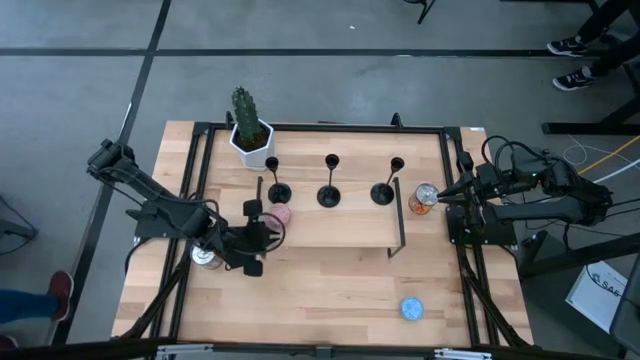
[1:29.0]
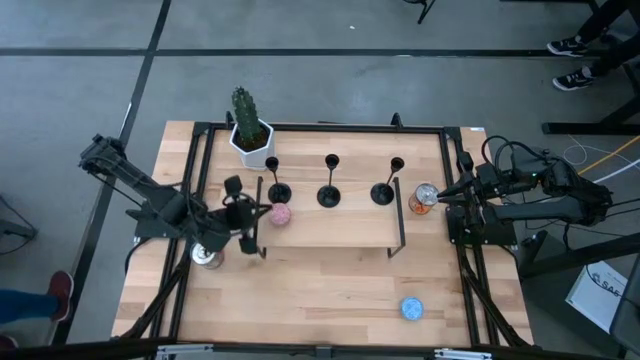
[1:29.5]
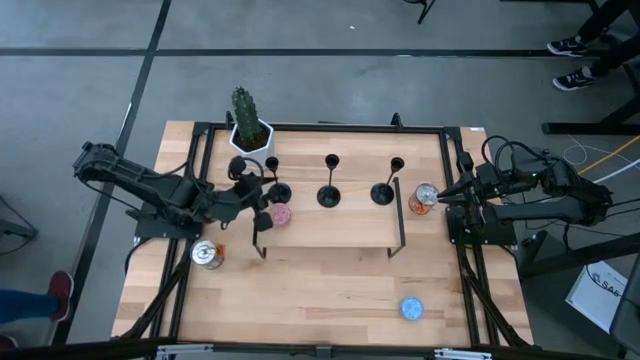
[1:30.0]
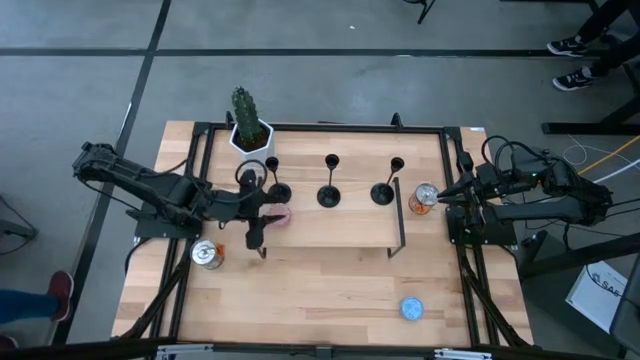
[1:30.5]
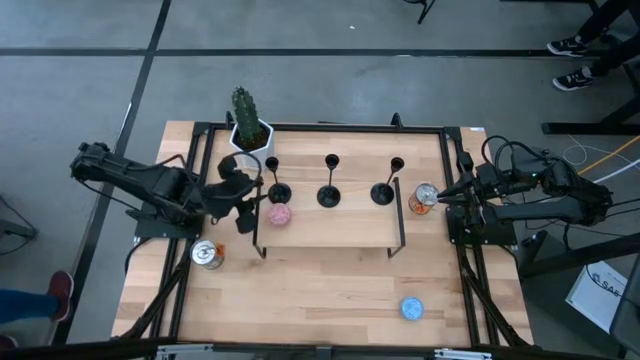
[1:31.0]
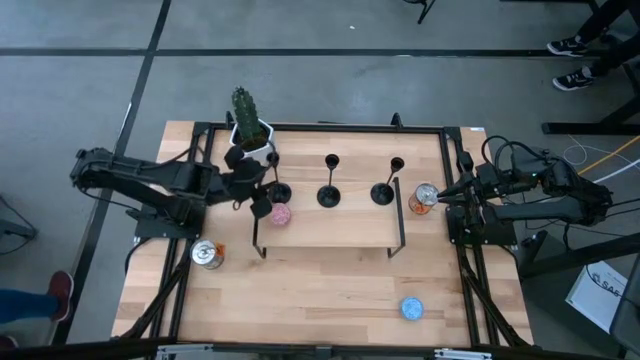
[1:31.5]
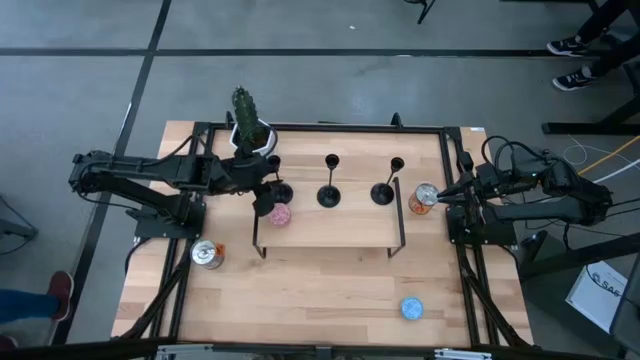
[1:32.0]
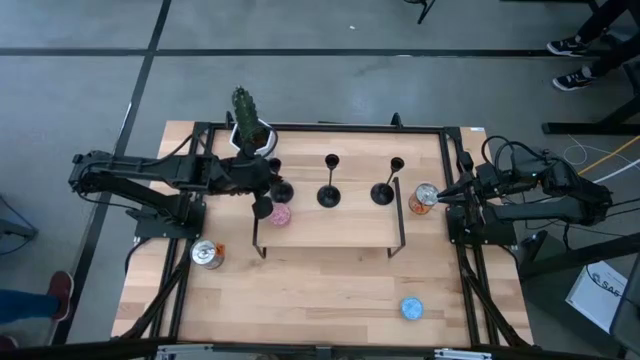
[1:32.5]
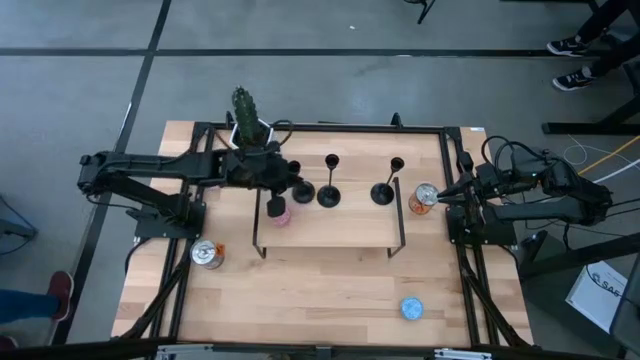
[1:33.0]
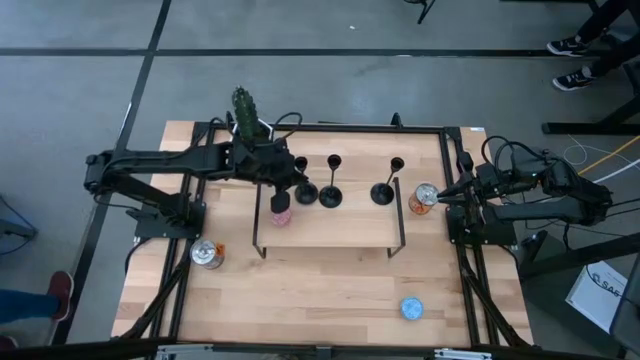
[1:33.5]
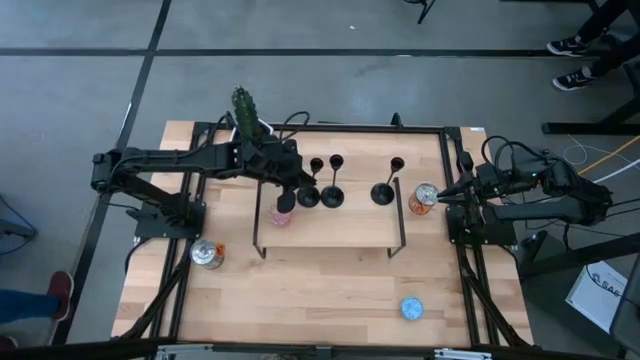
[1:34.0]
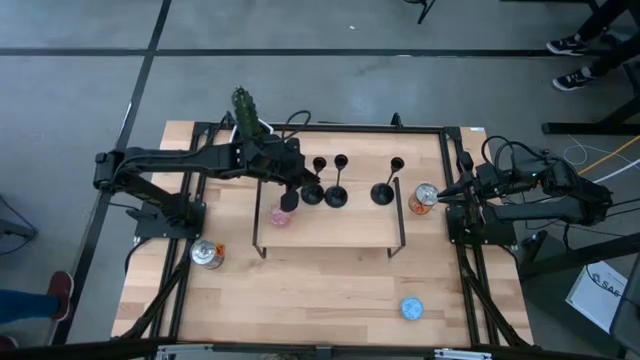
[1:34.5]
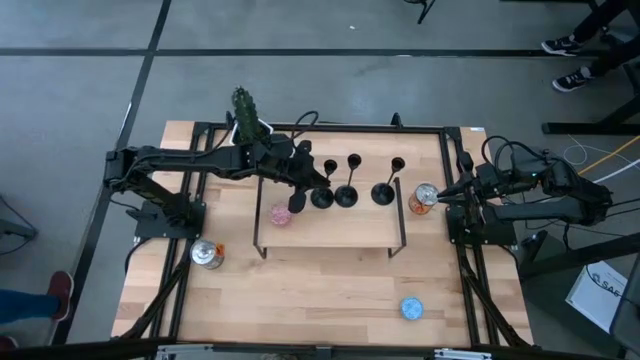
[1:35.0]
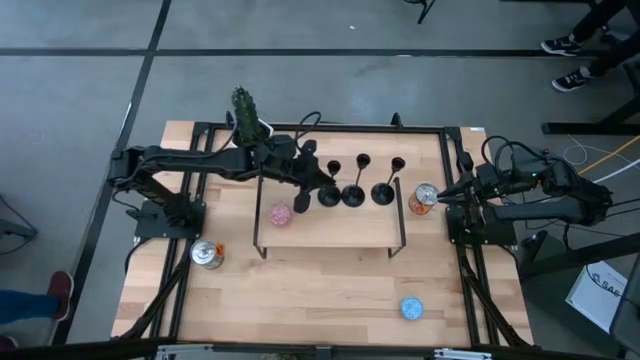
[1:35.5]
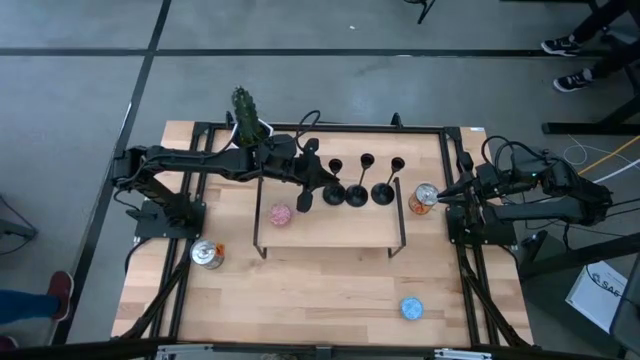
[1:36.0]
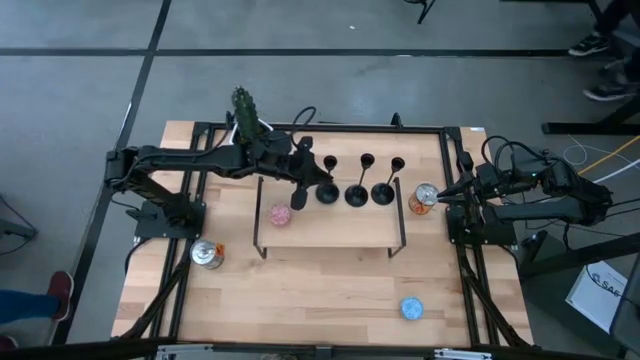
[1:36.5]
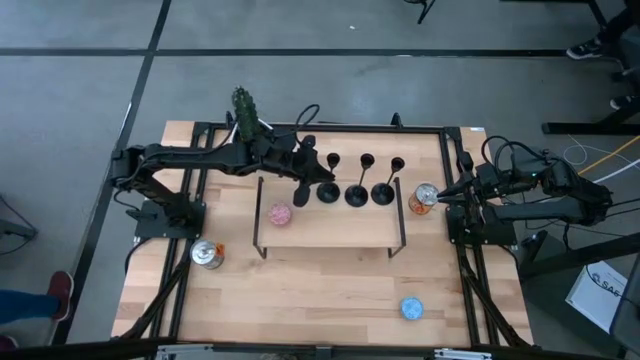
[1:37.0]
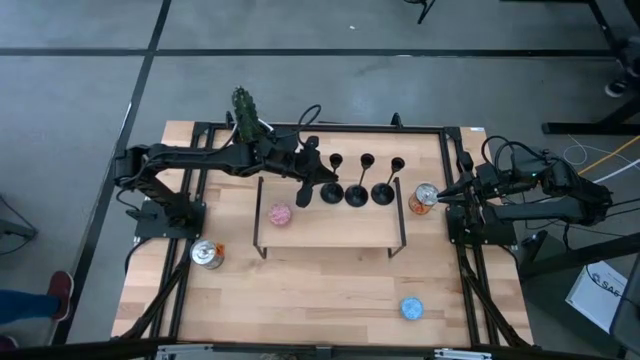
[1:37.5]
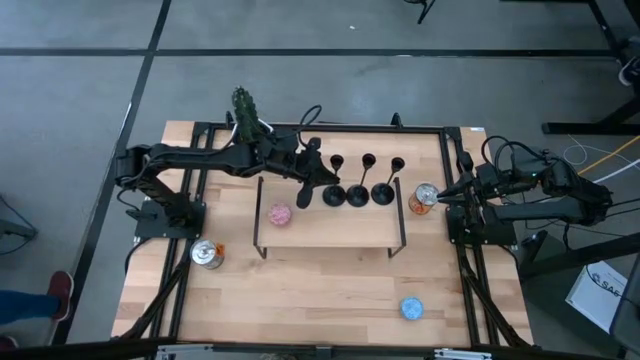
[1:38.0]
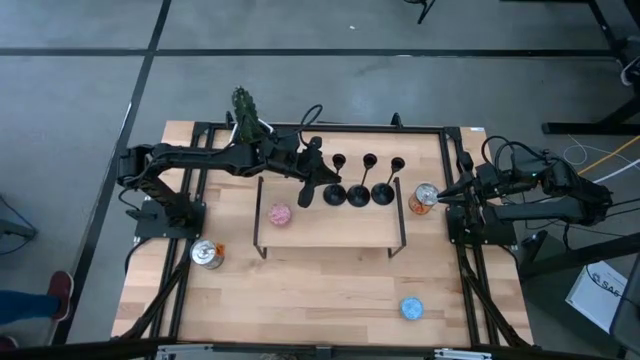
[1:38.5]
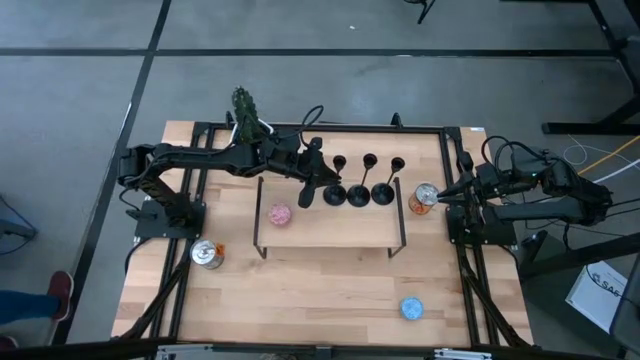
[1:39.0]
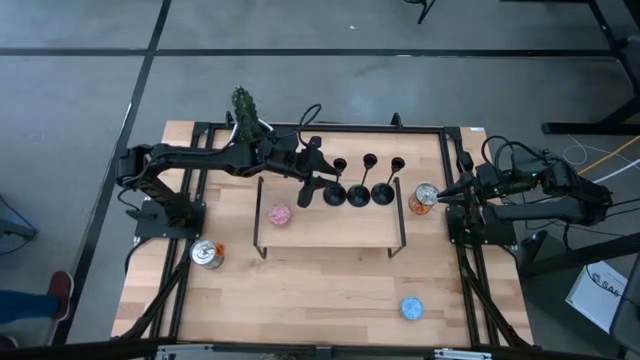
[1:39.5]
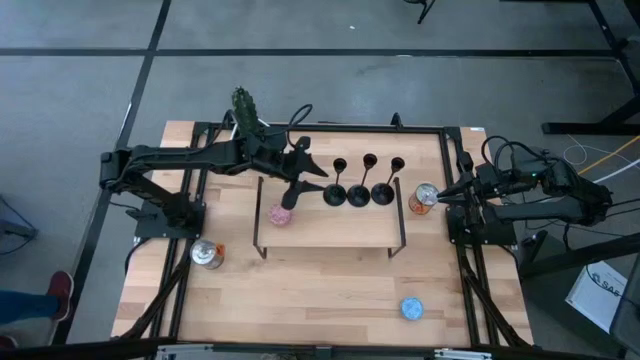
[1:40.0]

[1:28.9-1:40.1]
Task: Pick & Place candle stick holders
Adjust the black candle holders on the shelf

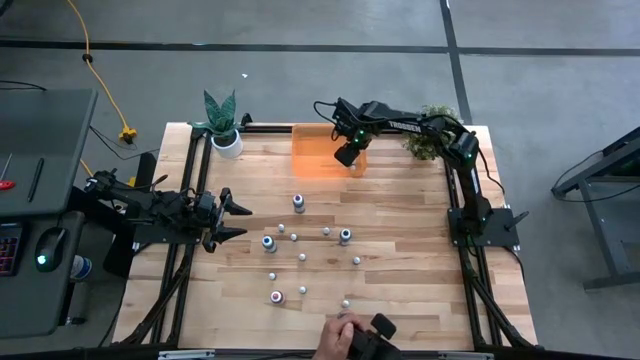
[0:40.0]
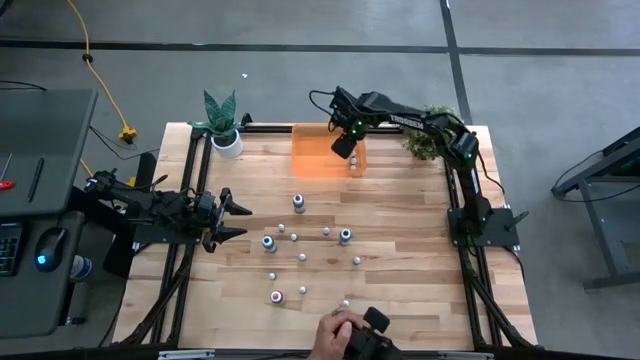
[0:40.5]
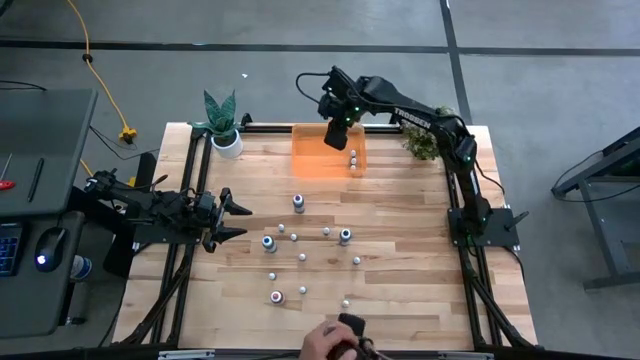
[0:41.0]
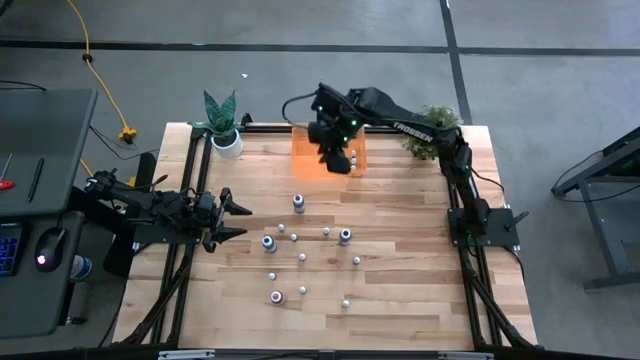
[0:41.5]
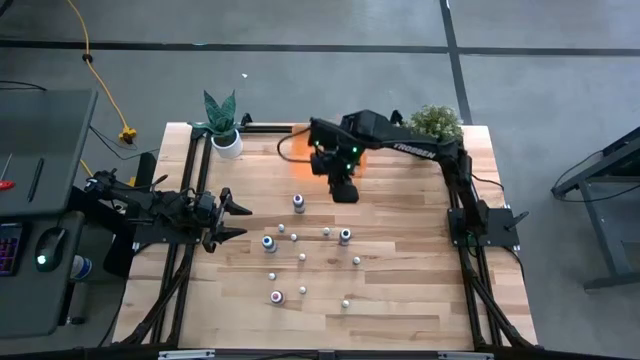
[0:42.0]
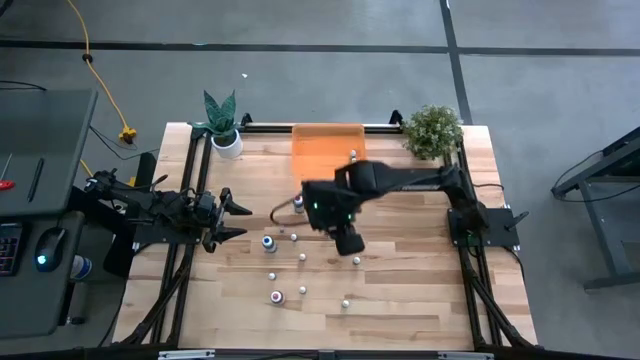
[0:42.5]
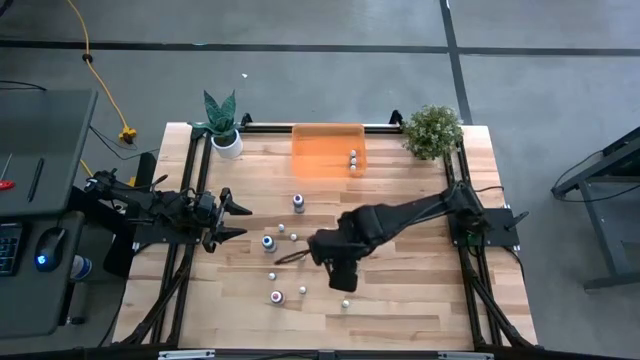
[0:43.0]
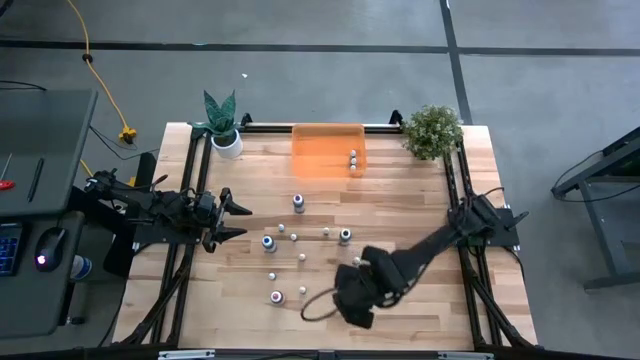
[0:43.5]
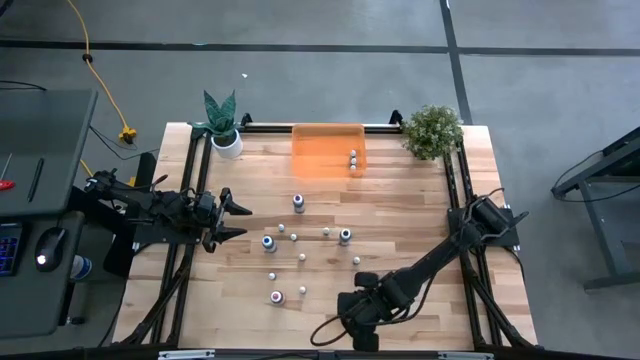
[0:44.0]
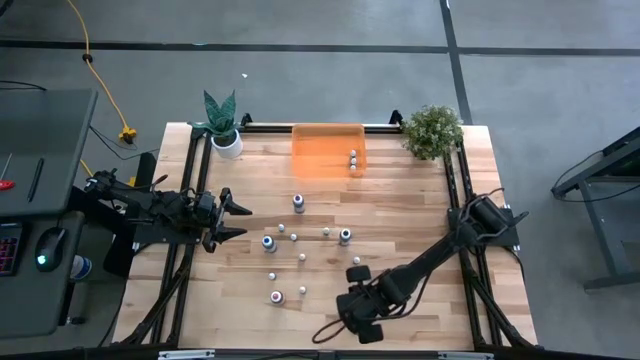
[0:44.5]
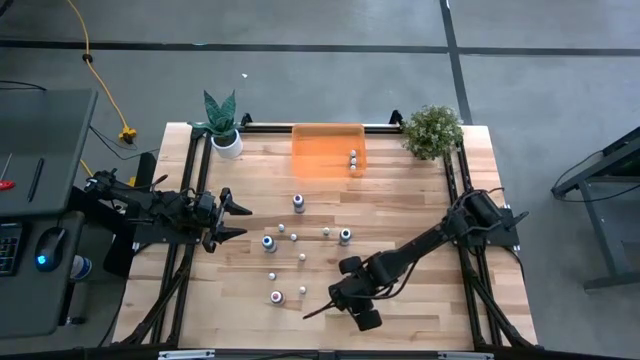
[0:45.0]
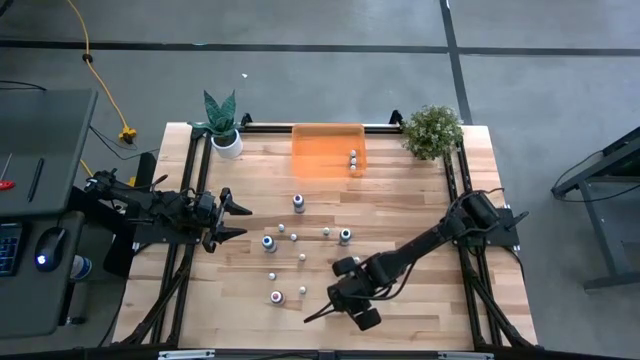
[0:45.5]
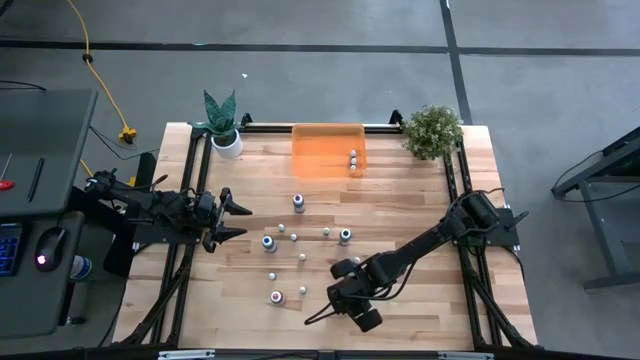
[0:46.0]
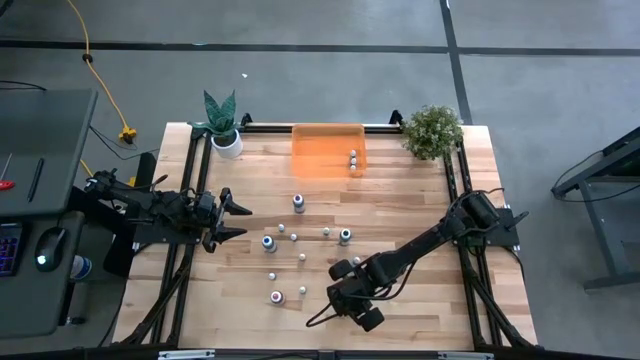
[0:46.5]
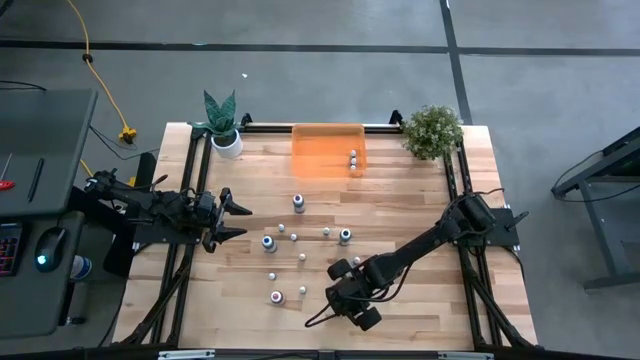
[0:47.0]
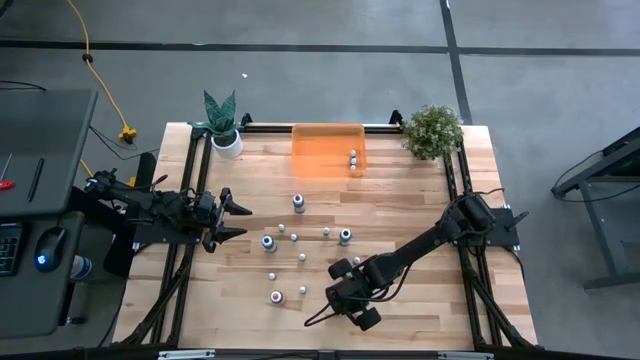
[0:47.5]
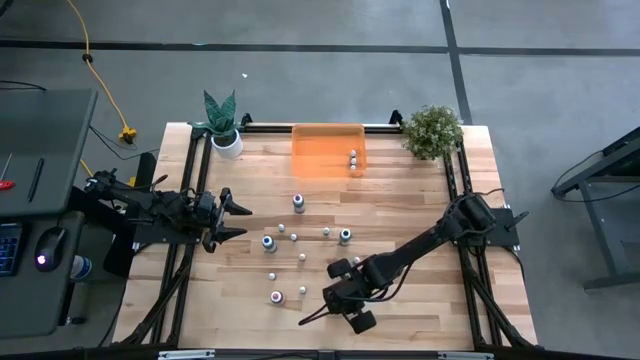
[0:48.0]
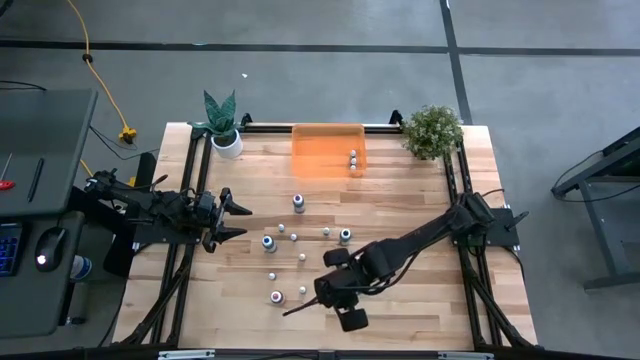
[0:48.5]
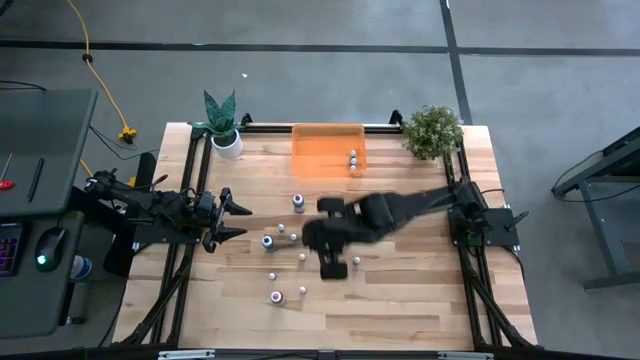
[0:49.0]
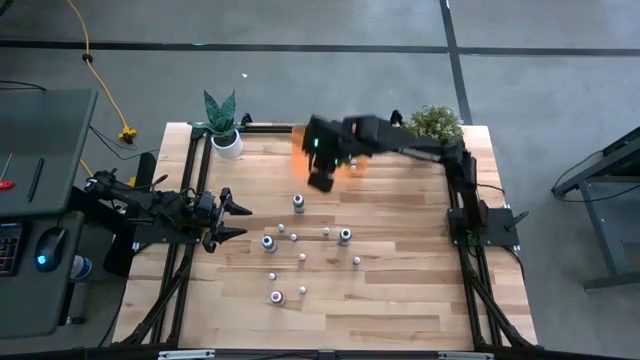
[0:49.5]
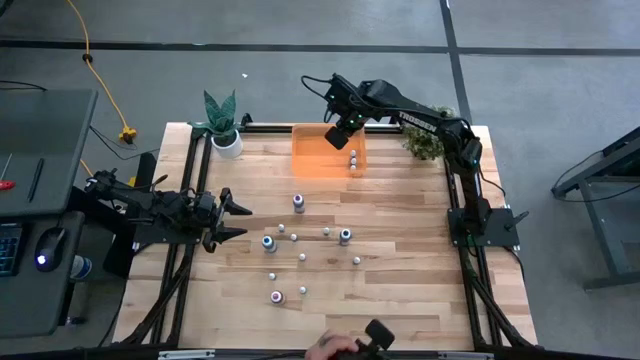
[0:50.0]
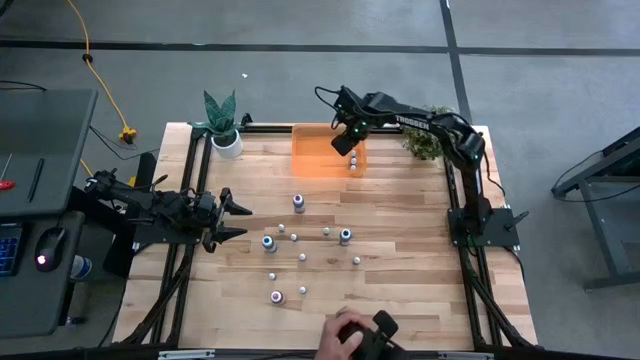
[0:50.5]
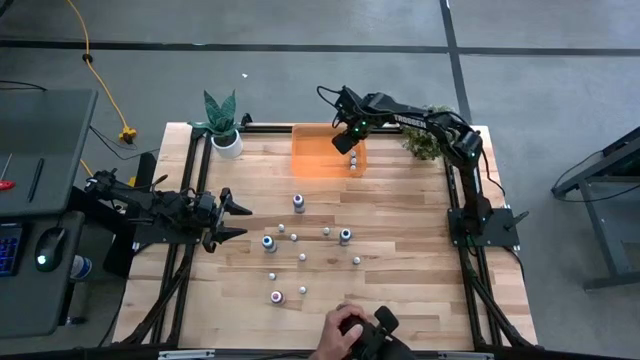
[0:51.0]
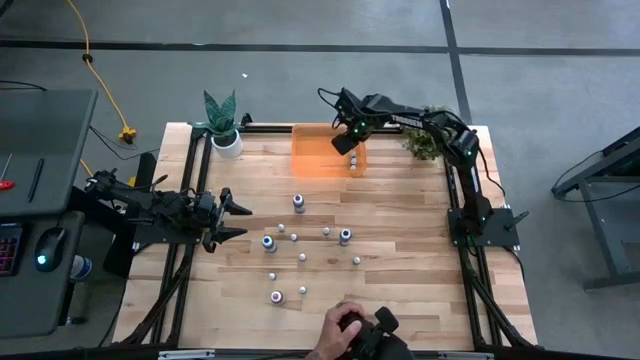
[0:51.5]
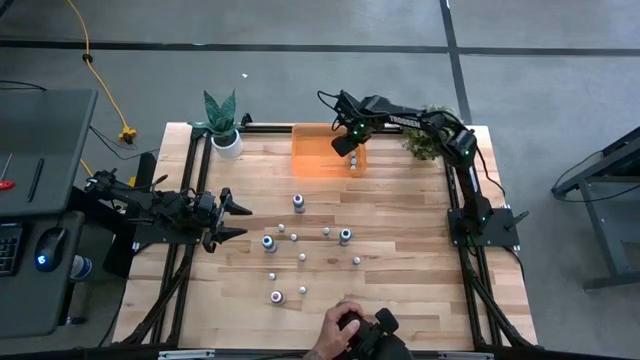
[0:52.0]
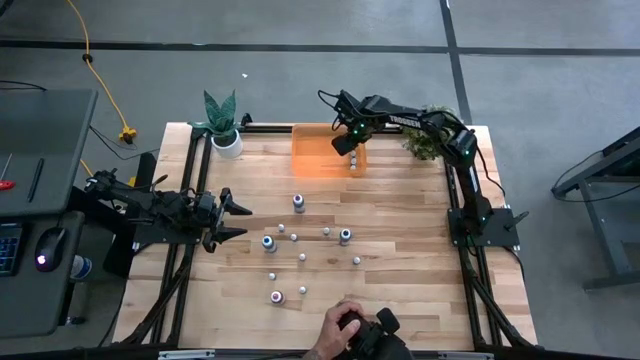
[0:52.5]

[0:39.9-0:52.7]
Task: Pick & Place food coloring
Put the small black food coloring bottle into the orange bin
